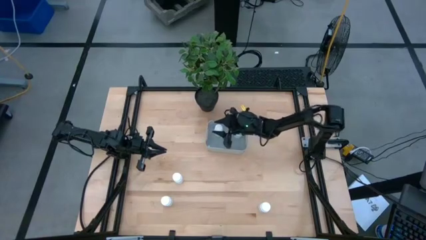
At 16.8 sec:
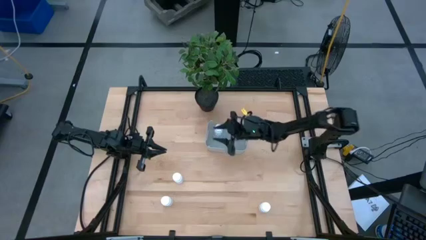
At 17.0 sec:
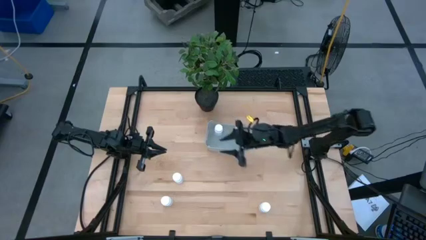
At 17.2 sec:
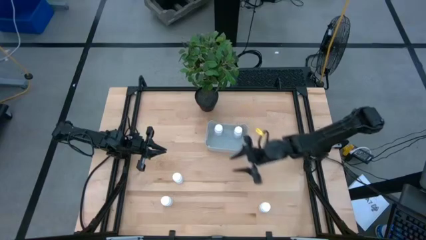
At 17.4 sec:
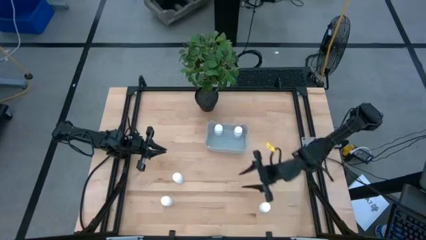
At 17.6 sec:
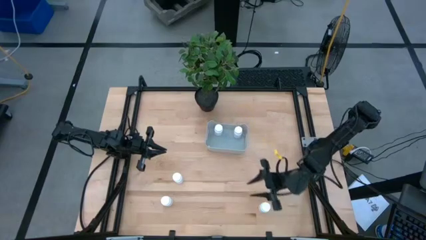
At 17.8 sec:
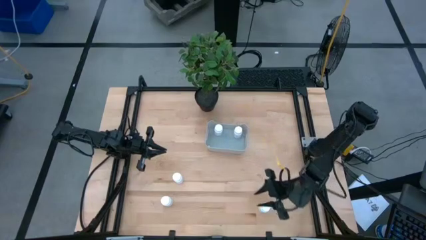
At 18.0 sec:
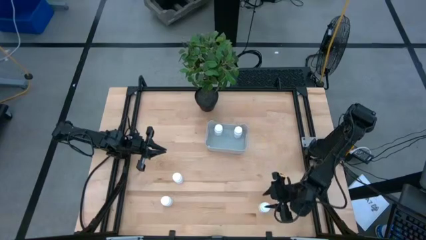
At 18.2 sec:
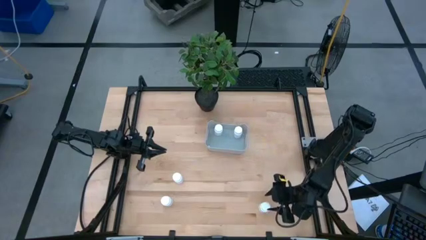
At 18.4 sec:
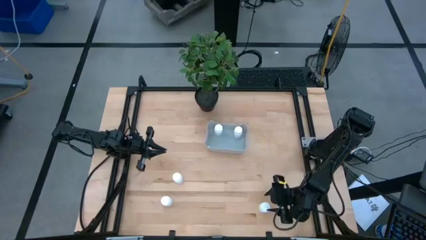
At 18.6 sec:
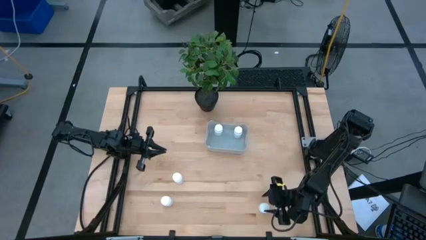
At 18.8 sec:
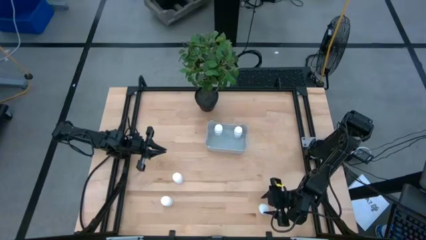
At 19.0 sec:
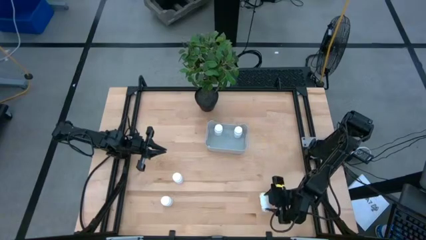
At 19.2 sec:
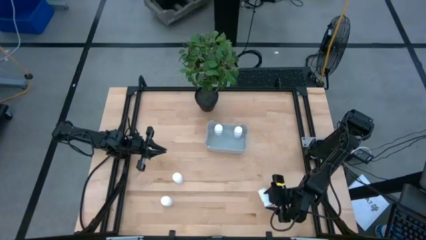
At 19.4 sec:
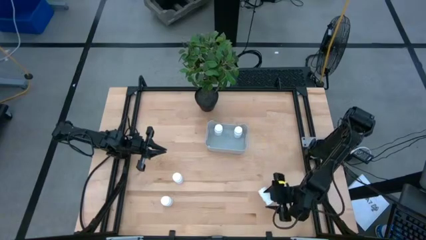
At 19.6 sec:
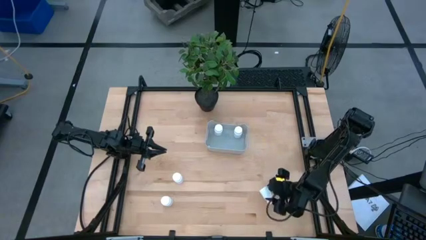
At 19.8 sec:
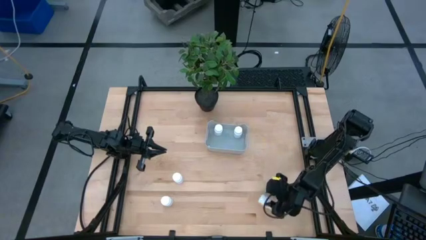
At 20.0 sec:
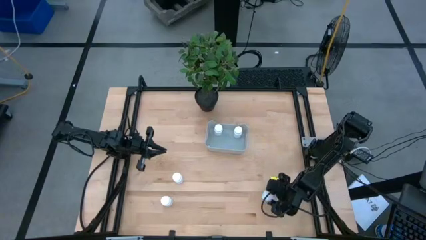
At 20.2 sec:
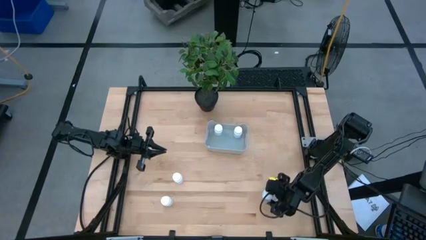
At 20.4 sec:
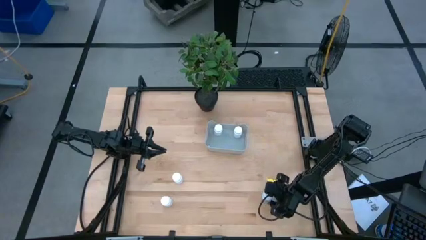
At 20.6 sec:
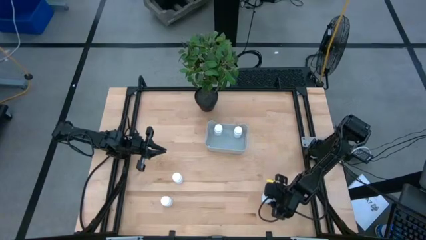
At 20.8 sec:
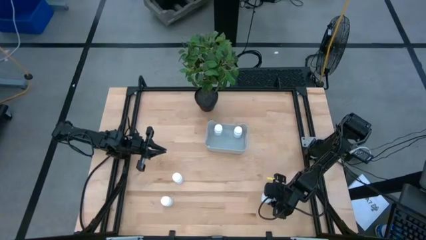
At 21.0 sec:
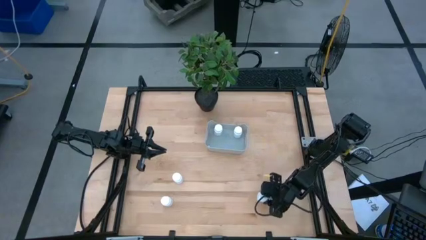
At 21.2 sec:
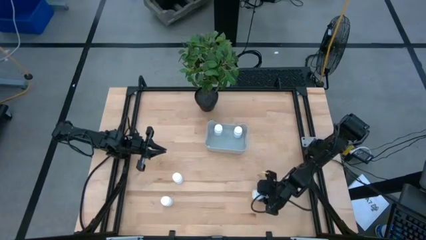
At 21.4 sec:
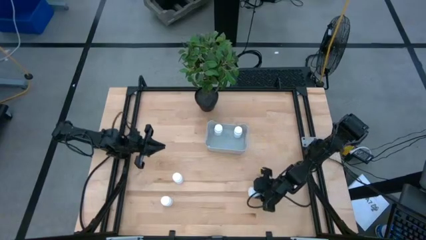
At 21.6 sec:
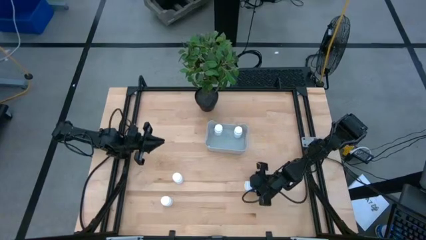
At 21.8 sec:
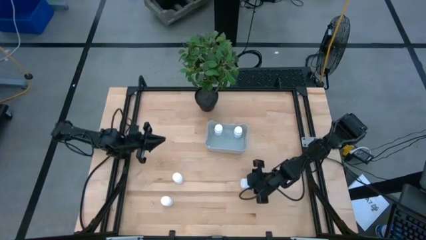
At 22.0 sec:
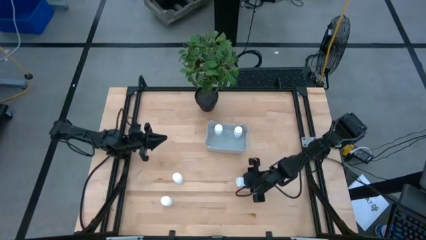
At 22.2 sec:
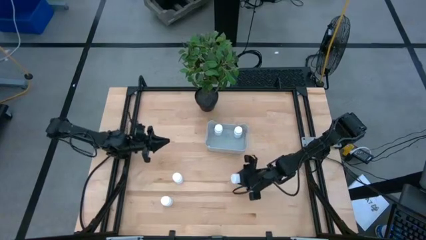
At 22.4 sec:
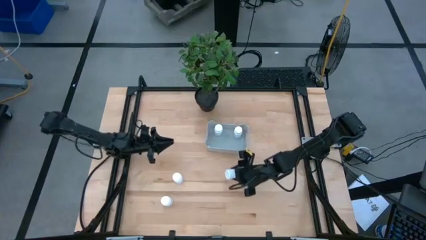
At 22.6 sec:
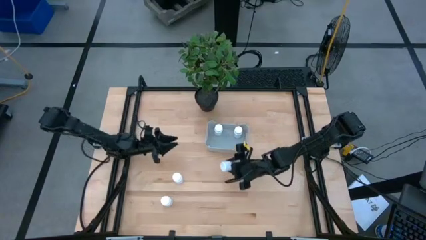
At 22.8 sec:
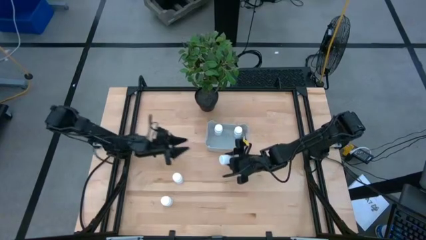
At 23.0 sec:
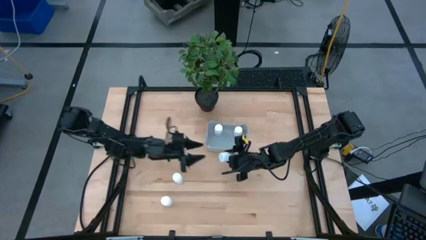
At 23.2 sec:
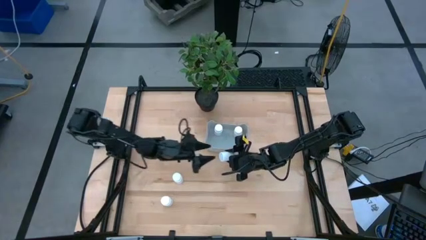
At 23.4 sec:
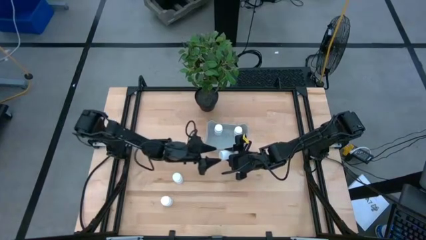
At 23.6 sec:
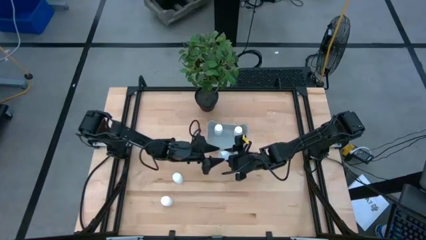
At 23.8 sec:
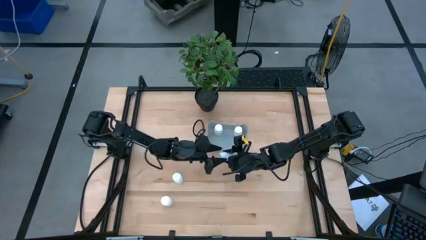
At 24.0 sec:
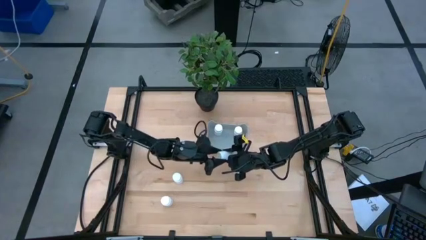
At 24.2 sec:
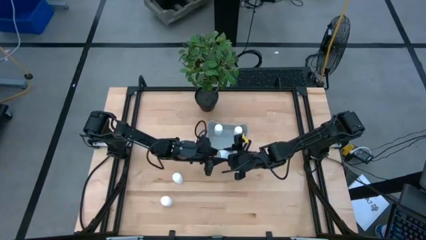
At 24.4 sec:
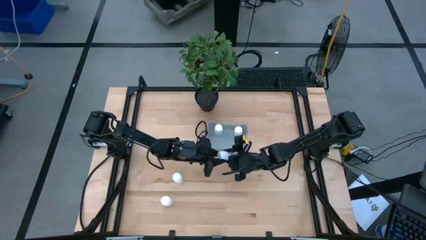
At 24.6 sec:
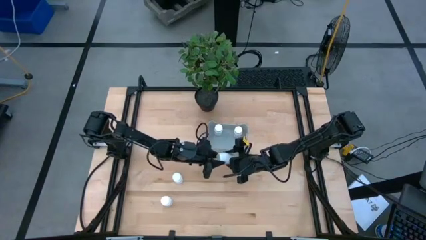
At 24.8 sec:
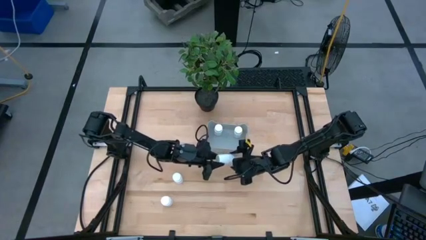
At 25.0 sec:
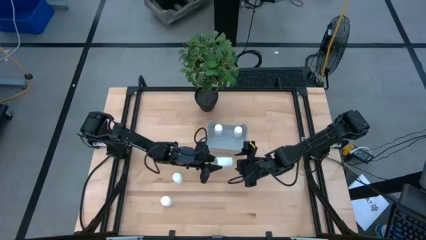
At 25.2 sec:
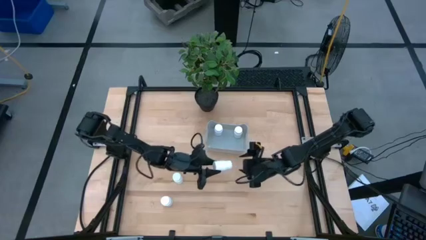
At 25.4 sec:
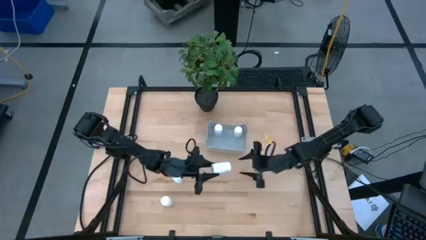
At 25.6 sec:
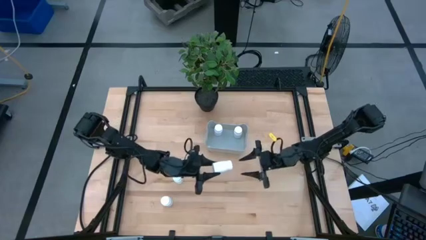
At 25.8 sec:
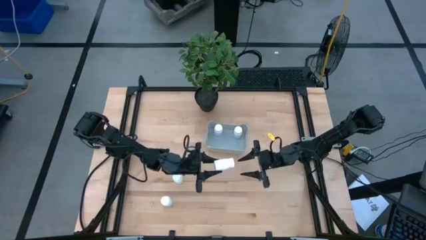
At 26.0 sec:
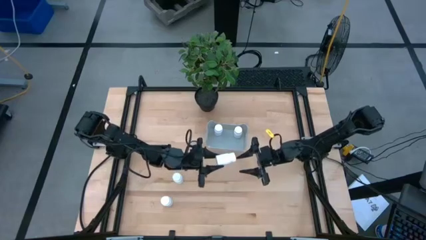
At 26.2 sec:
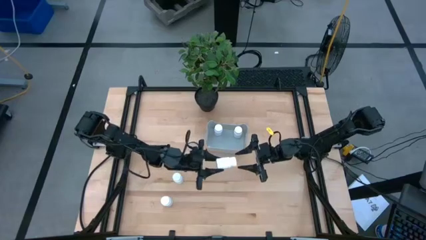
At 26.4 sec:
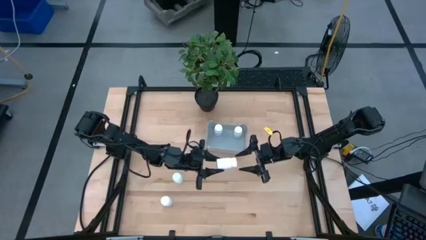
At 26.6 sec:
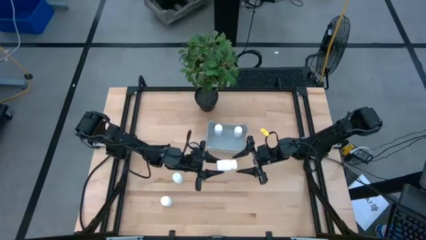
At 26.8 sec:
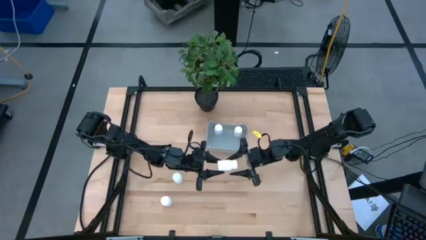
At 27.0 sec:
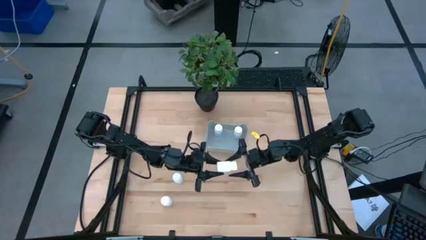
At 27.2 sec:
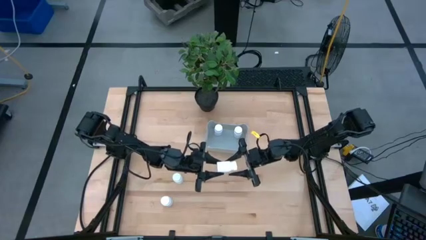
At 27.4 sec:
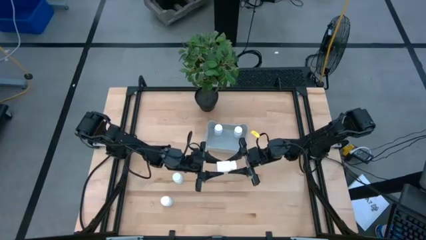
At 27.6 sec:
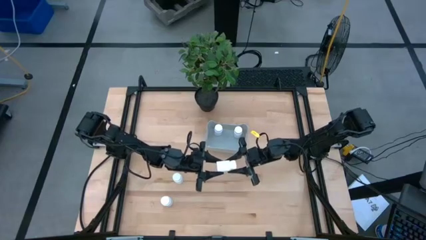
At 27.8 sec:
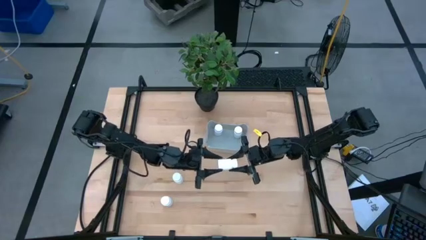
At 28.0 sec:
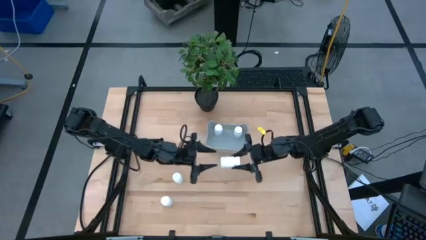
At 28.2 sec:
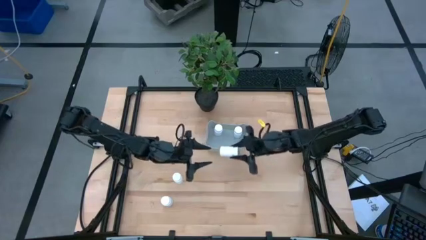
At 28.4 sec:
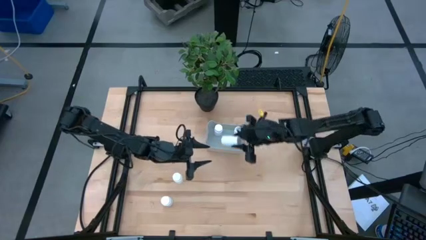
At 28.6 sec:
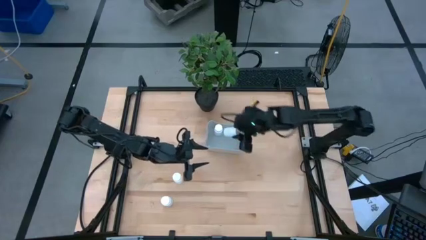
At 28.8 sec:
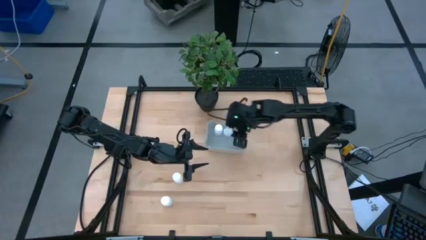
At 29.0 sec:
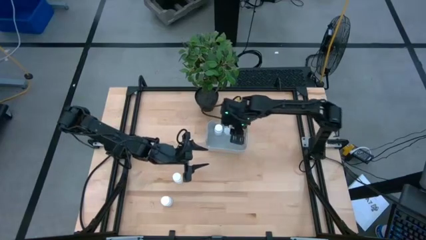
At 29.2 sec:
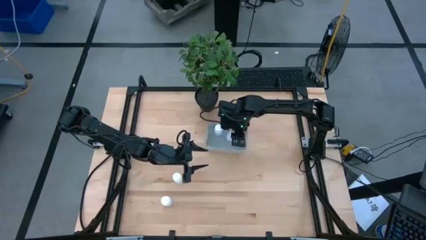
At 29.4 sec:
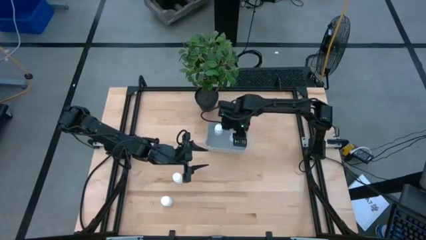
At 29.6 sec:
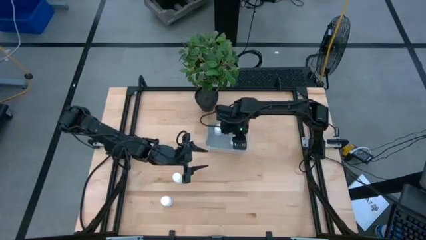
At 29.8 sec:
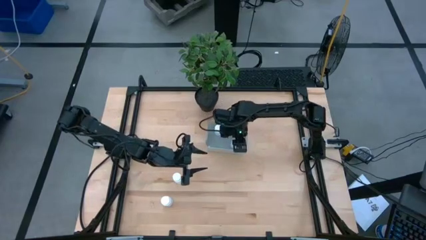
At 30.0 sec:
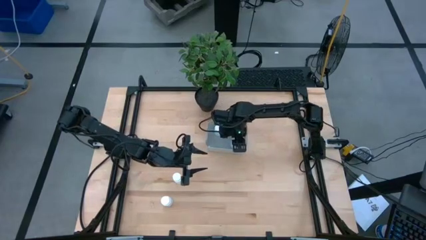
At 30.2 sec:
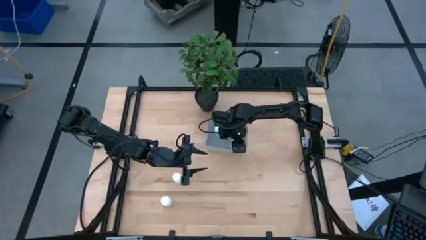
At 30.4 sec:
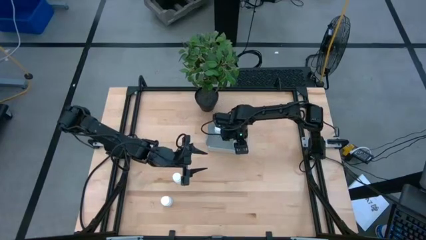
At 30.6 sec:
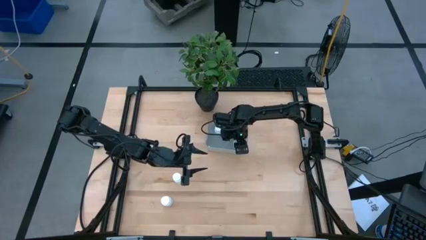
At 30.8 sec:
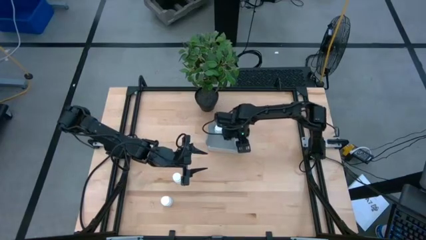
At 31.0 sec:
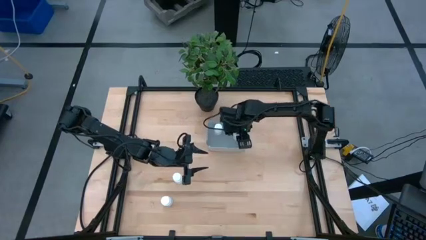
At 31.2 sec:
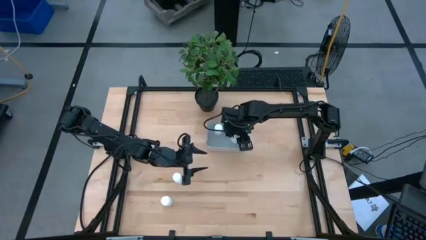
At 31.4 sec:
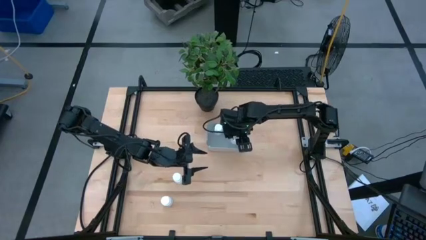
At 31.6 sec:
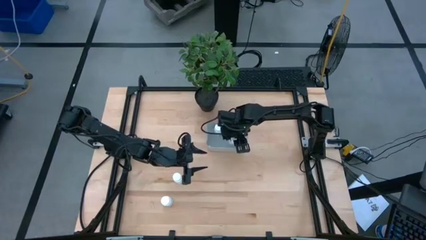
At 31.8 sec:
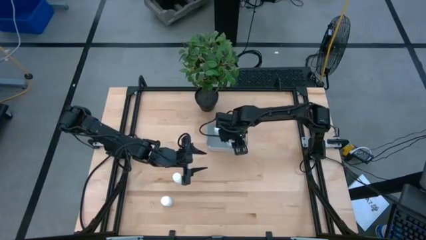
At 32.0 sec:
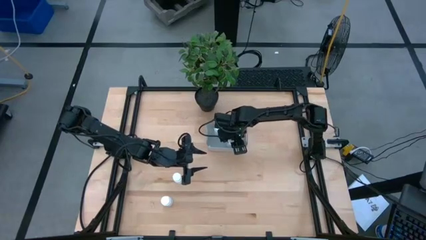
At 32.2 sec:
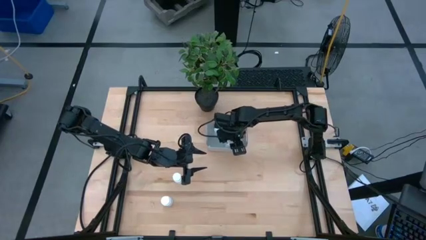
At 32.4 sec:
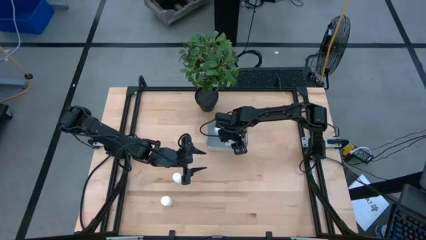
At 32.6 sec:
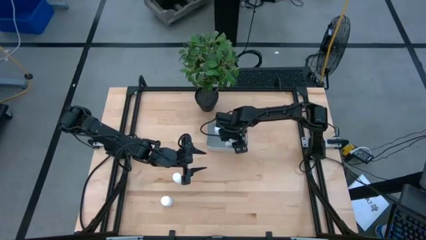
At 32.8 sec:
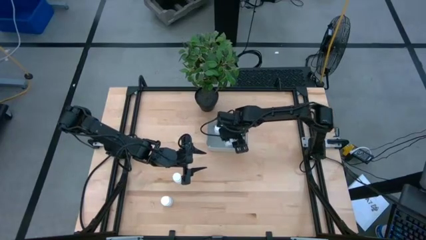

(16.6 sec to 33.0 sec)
Task: Pick and place pill bottles into a basket
Put the white medicine bottle into the gray bin
